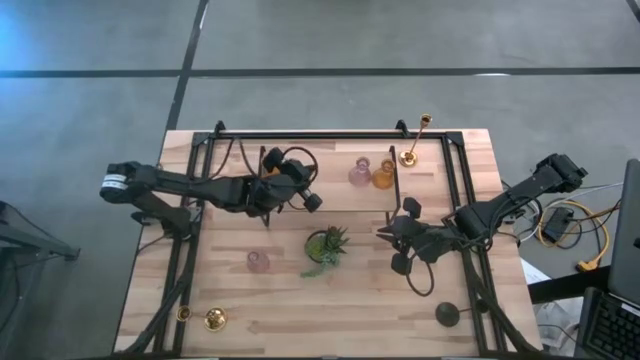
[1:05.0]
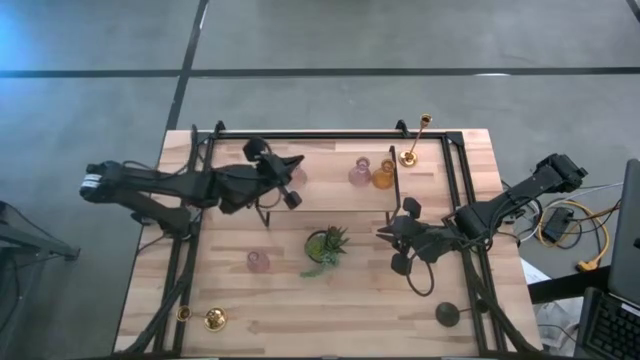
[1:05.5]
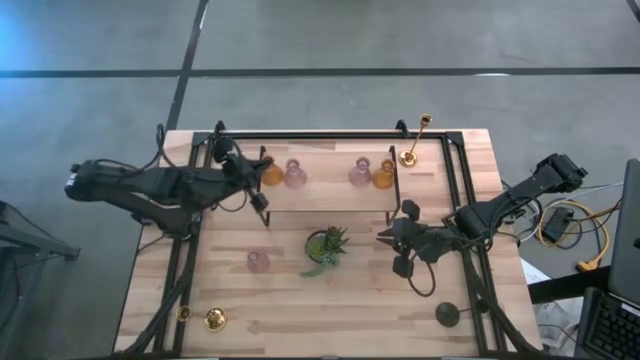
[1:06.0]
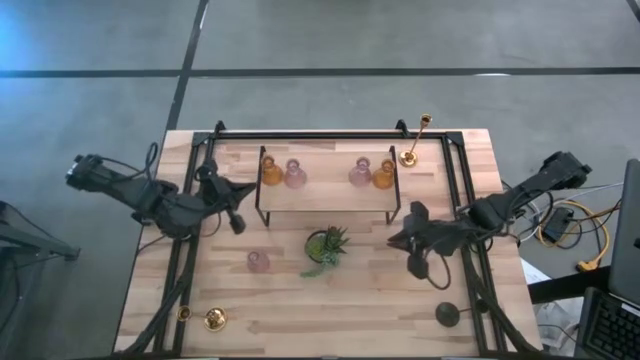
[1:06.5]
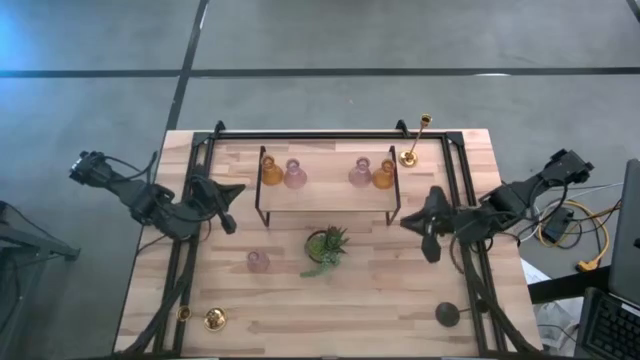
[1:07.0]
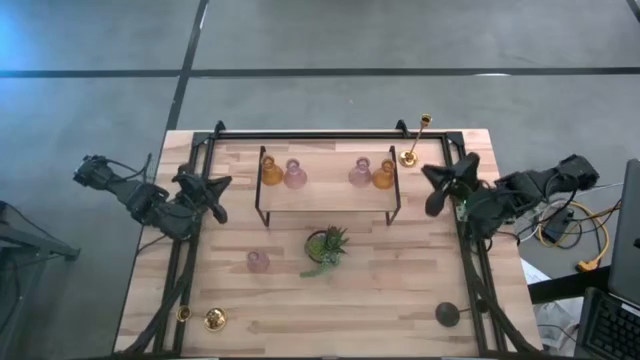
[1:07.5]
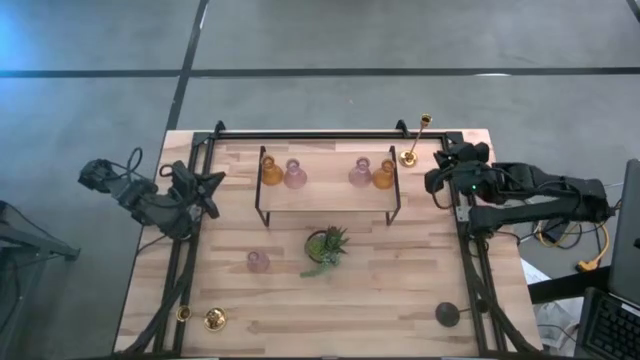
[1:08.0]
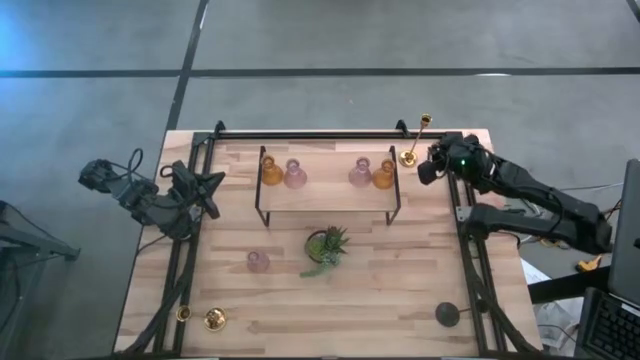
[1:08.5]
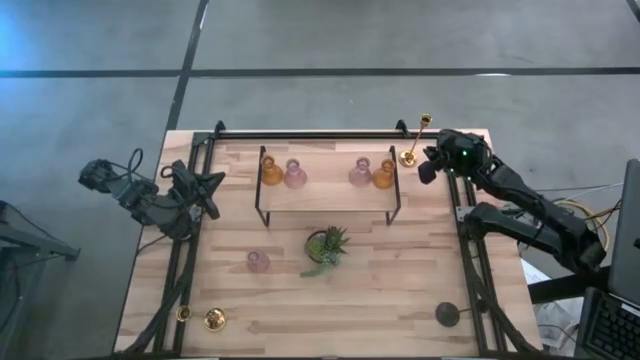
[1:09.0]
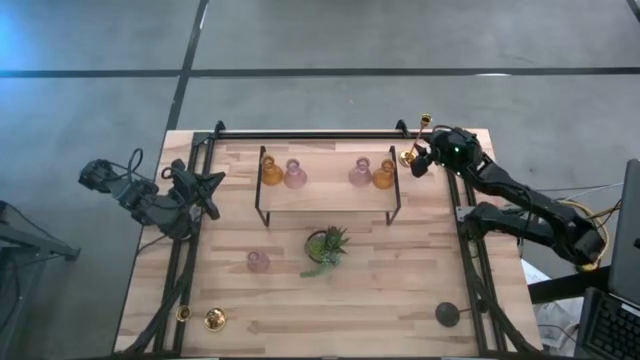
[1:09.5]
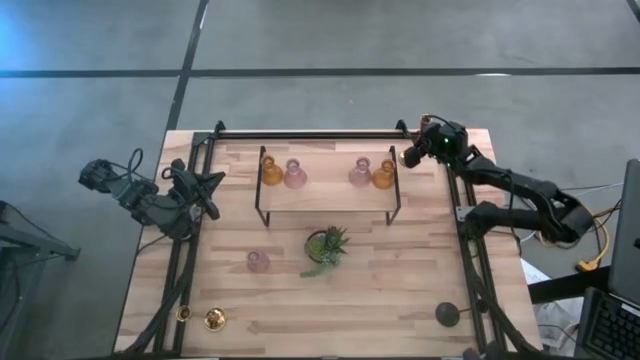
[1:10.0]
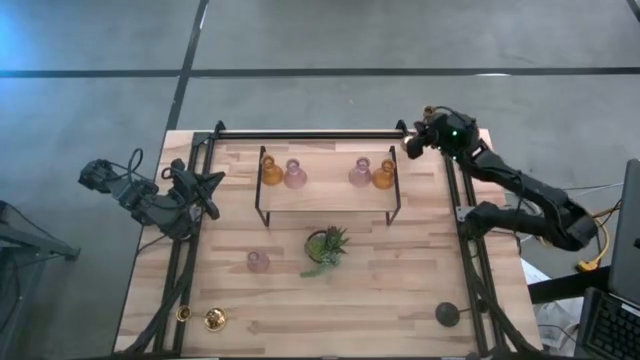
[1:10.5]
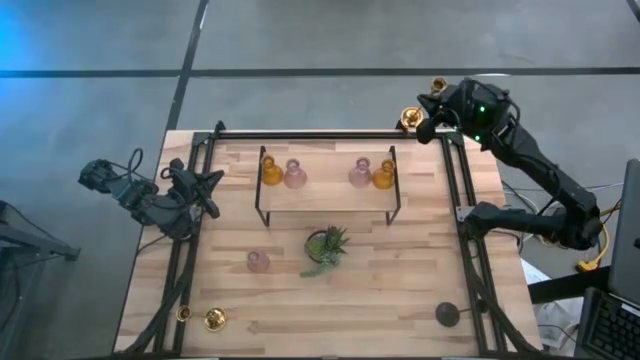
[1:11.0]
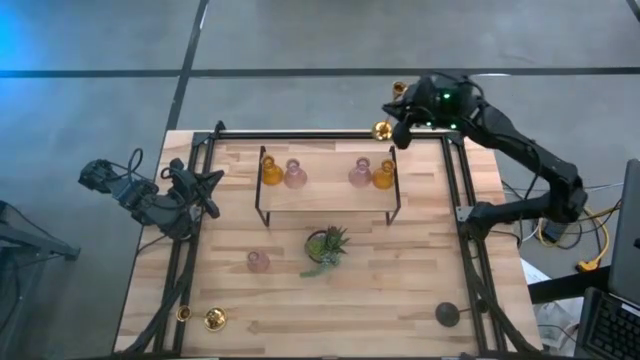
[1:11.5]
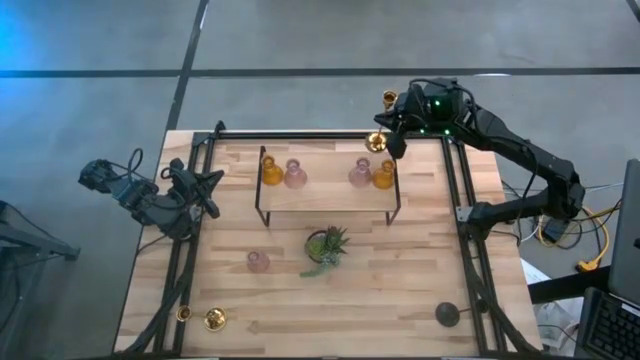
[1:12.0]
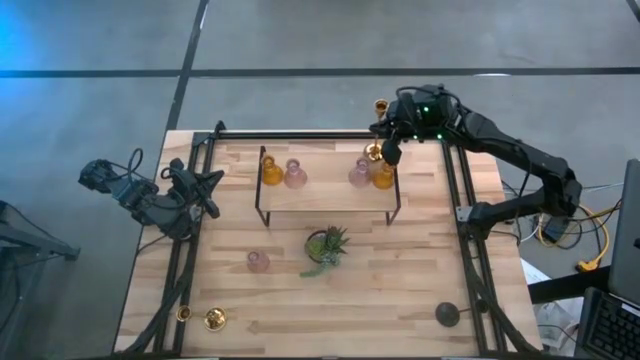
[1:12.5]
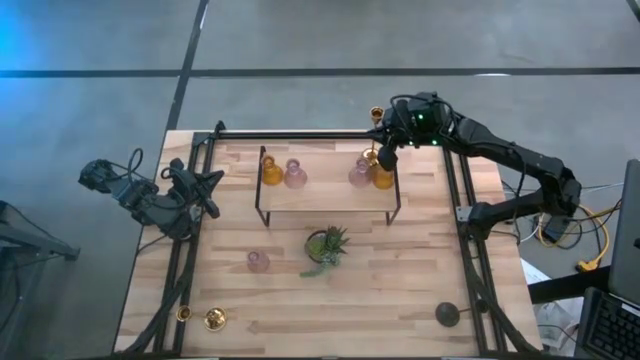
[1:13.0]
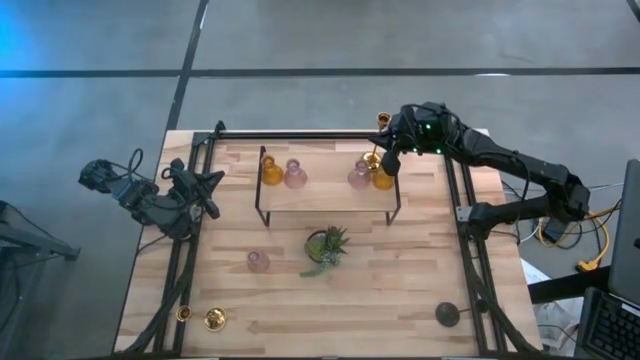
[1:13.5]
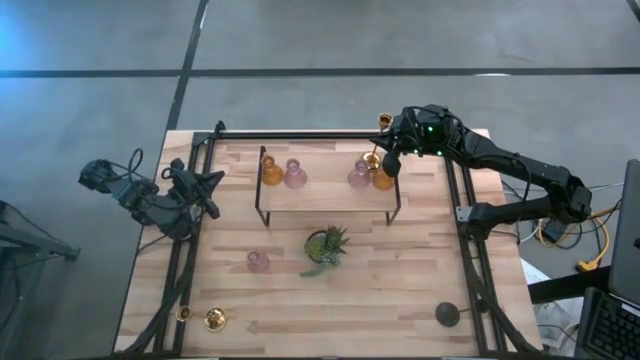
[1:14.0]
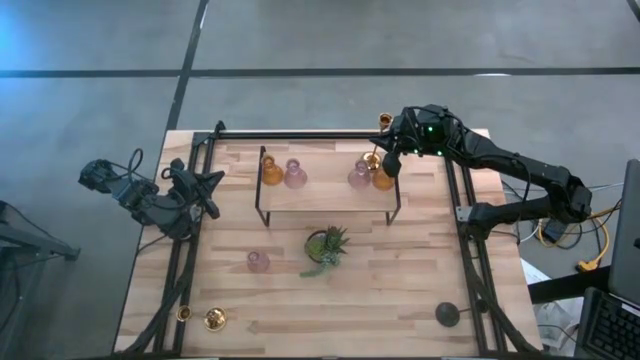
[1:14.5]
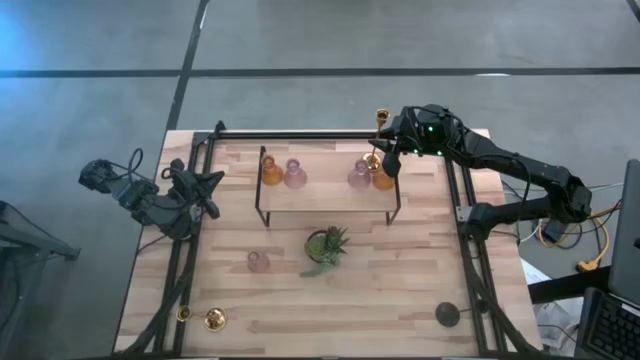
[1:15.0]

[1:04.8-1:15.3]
Task: Pick & Place candle stick holders
Put the gold candle holder on the shelf

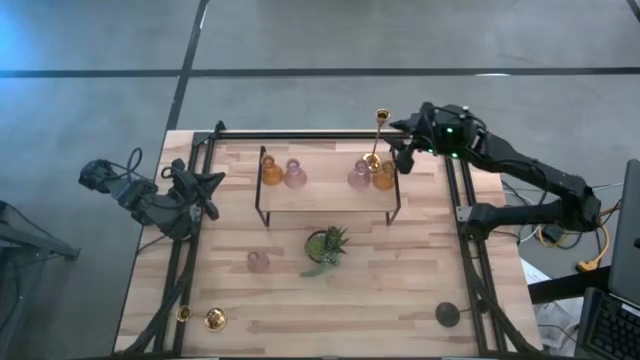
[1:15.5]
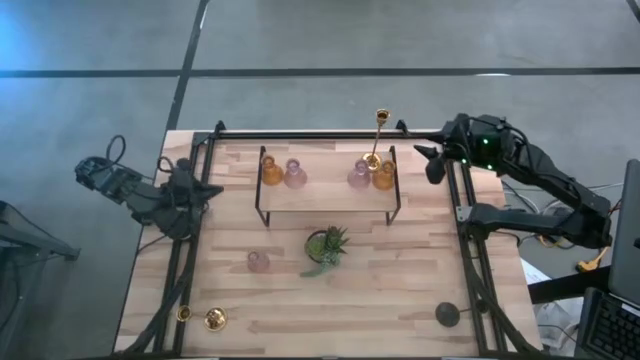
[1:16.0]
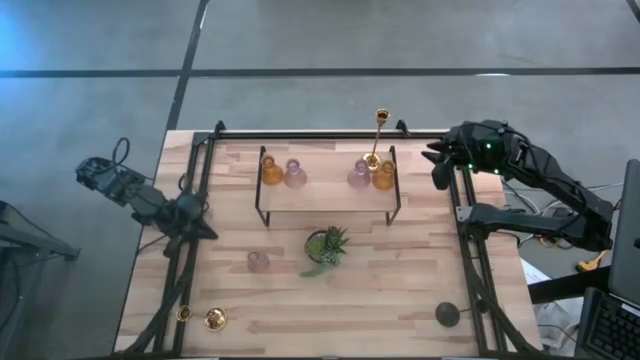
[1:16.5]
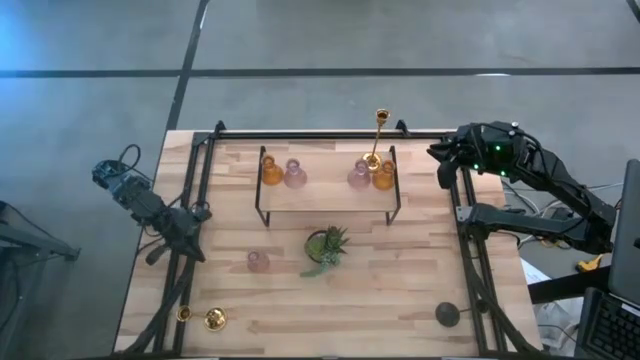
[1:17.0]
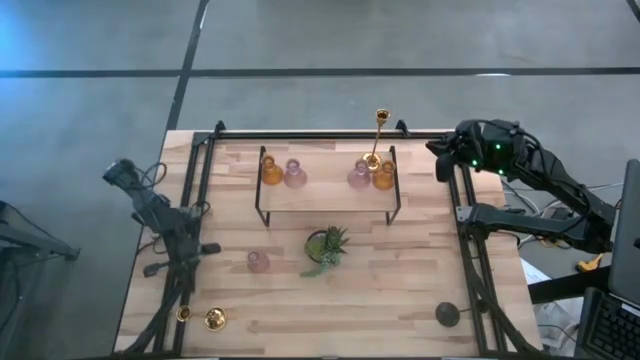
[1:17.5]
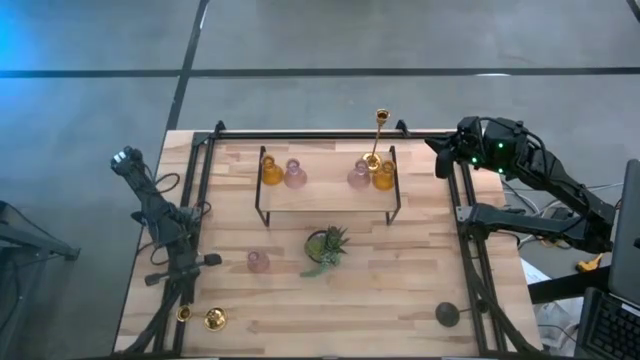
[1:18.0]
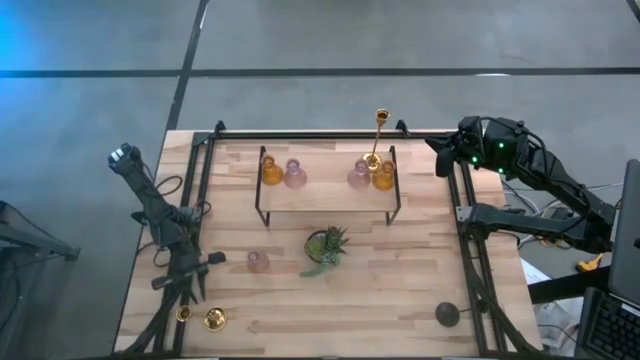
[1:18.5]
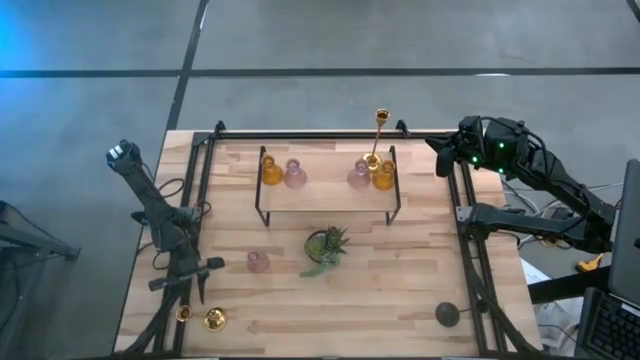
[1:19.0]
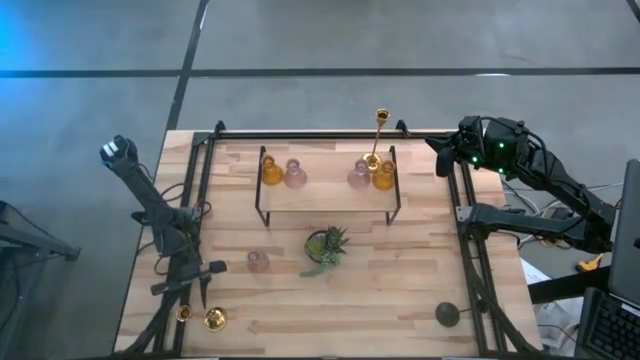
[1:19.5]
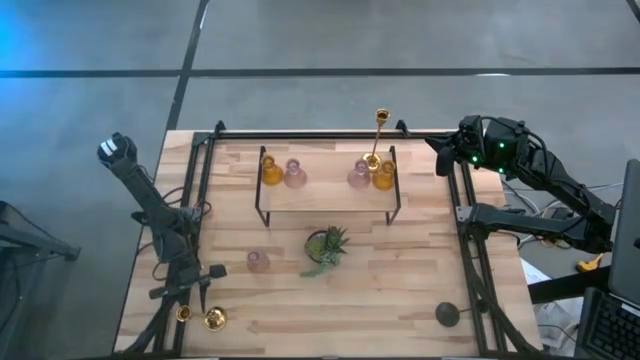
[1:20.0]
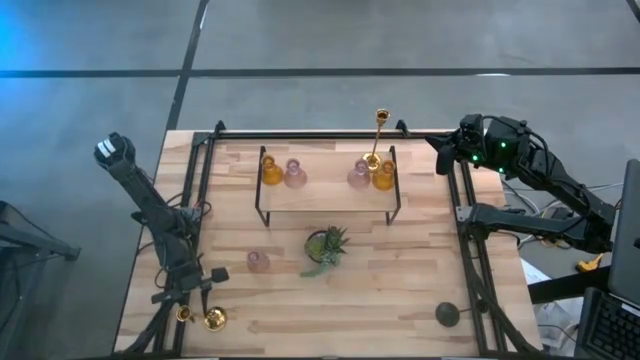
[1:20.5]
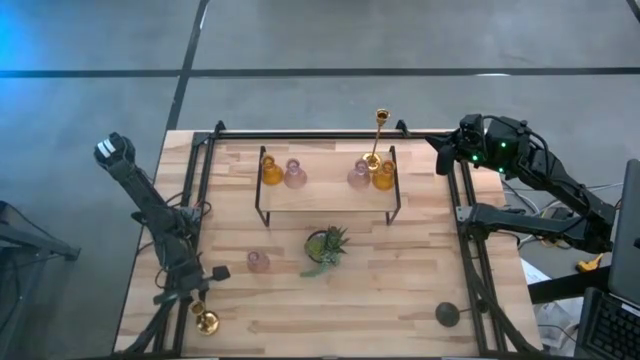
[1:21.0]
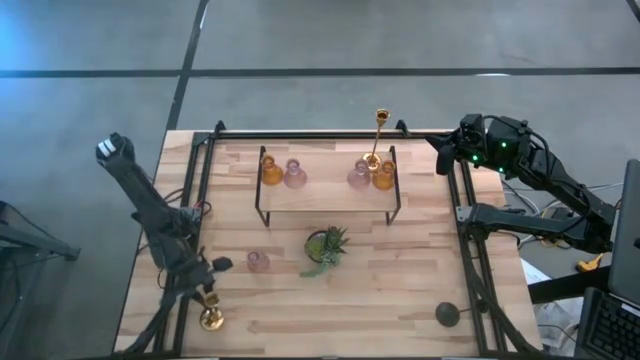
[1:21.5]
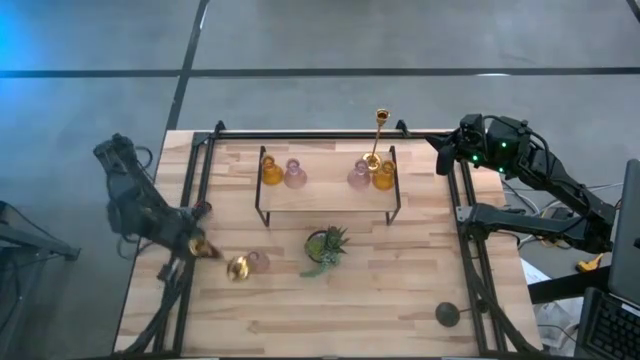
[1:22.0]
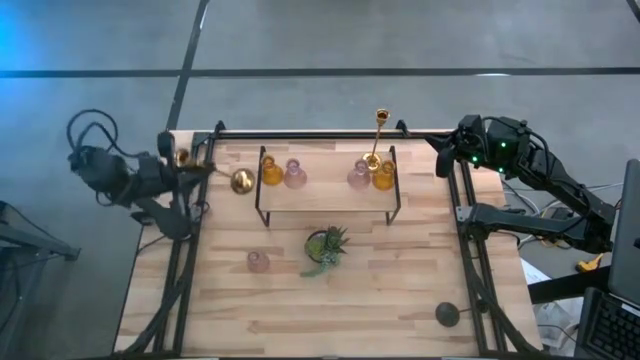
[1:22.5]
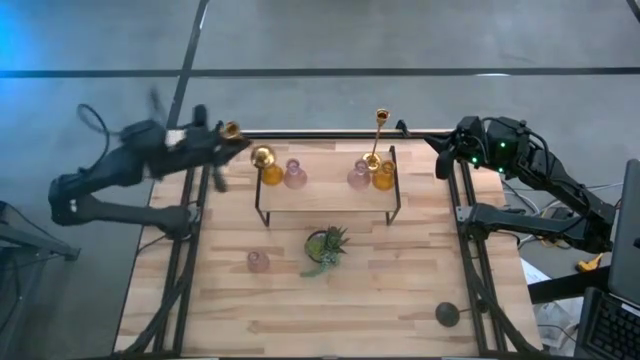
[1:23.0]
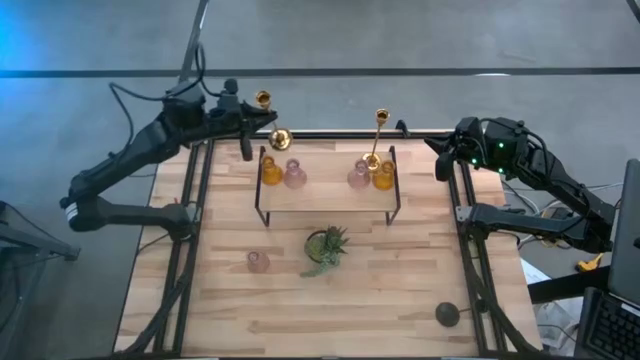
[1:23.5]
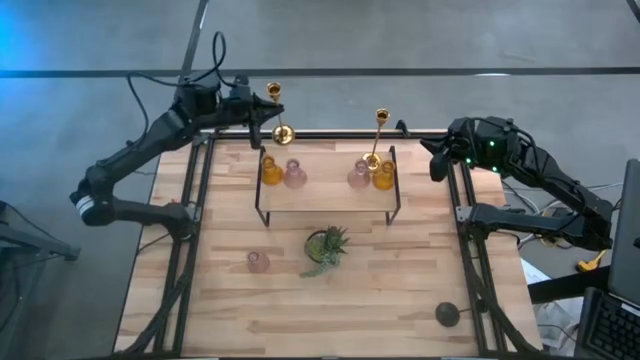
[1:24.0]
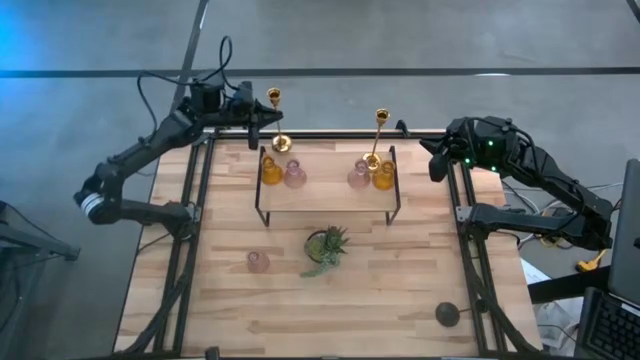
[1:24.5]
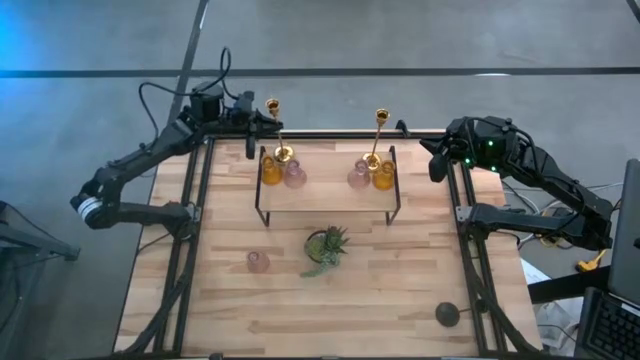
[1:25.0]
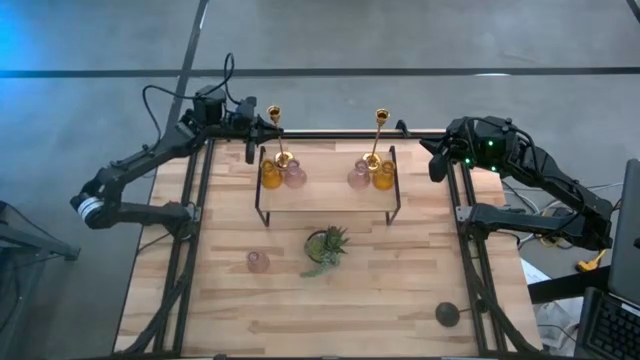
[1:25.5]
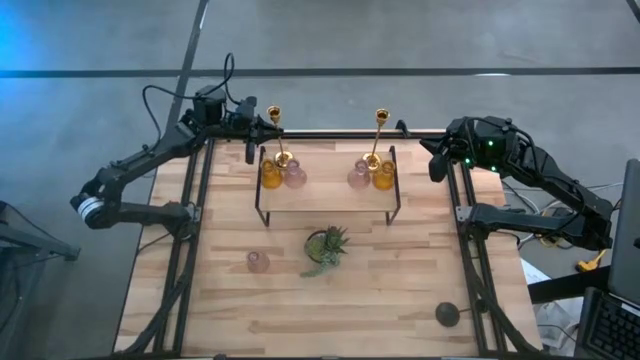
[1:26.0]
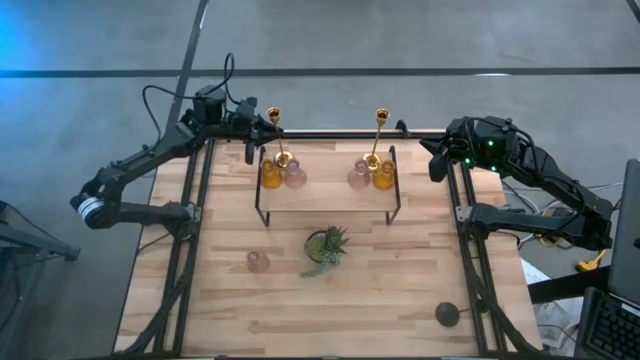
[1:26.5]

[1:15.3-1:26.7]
Put the gold candle holder on the shelf
